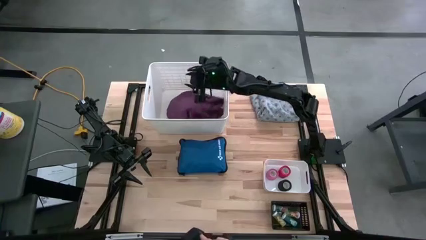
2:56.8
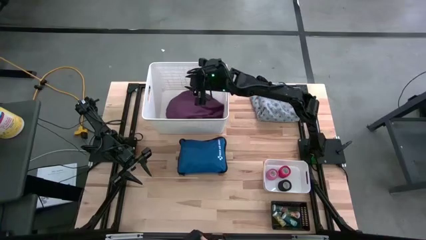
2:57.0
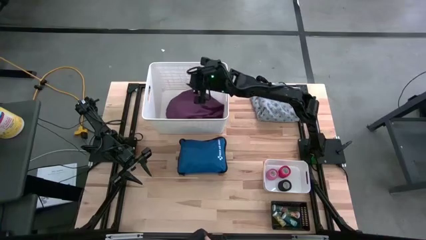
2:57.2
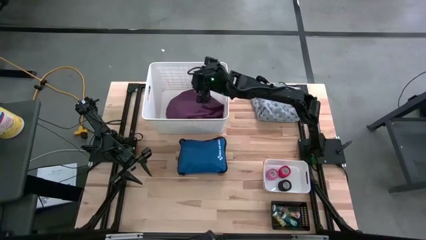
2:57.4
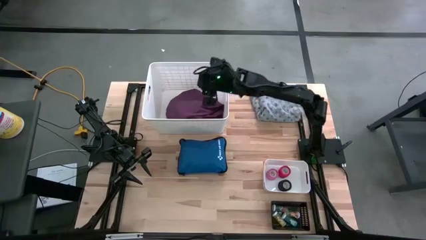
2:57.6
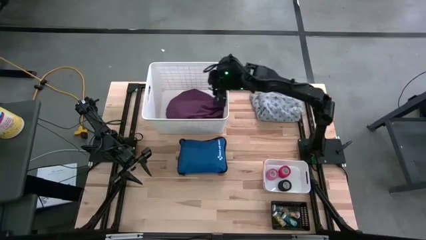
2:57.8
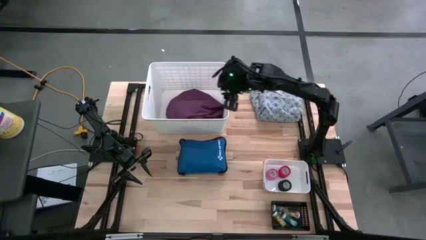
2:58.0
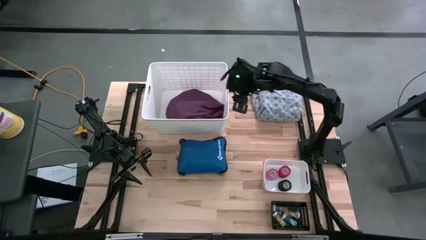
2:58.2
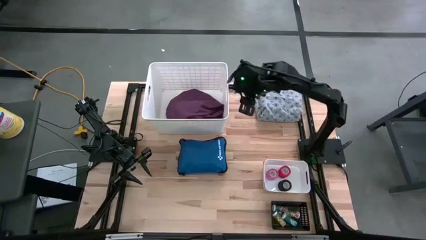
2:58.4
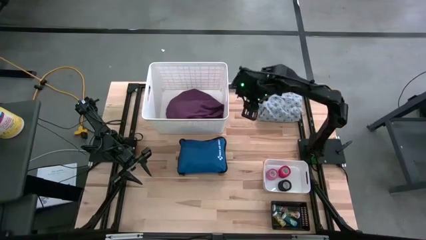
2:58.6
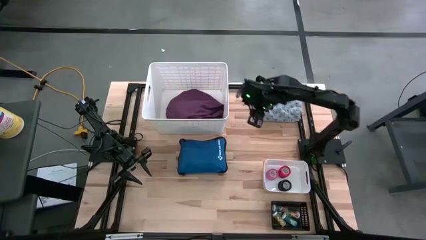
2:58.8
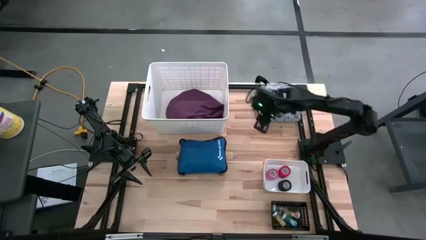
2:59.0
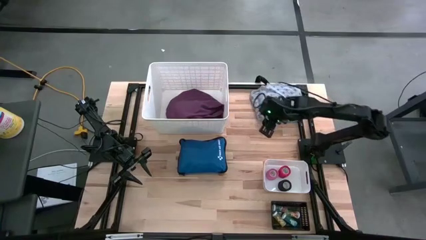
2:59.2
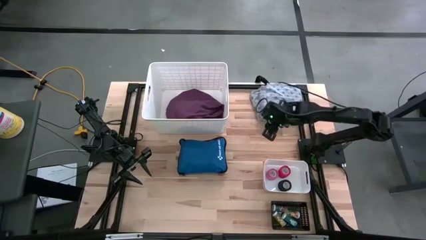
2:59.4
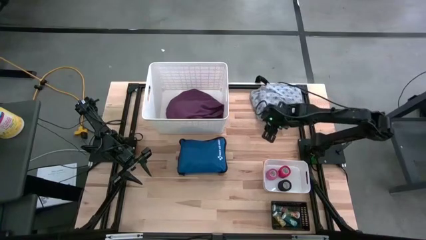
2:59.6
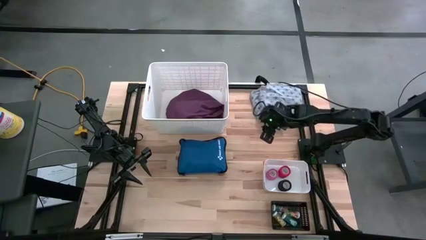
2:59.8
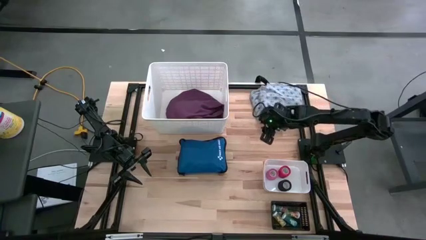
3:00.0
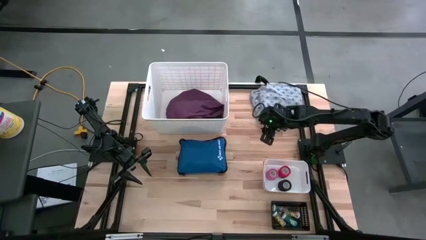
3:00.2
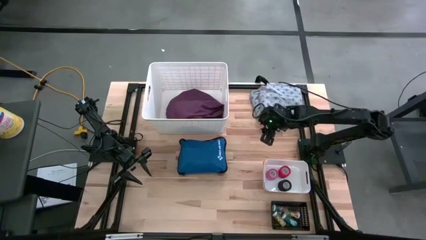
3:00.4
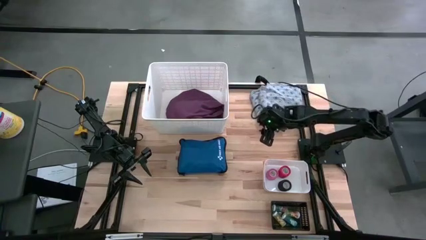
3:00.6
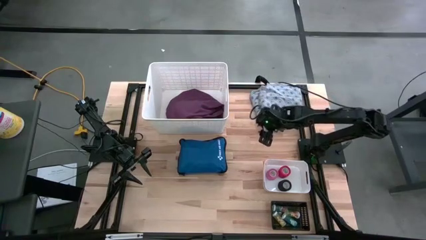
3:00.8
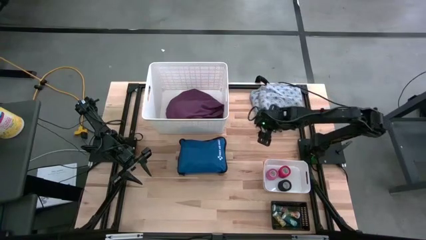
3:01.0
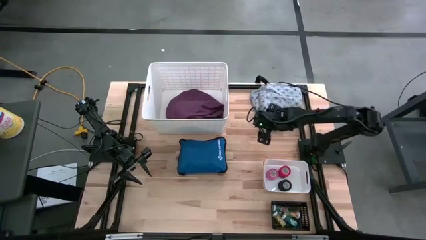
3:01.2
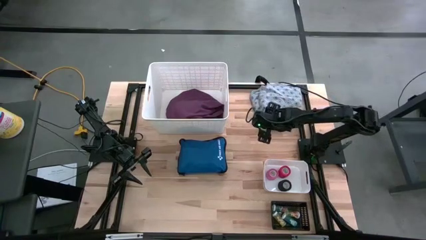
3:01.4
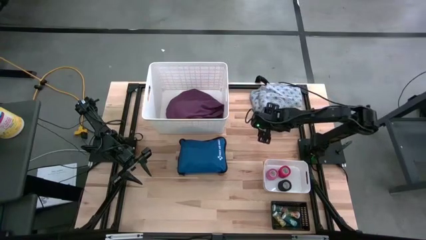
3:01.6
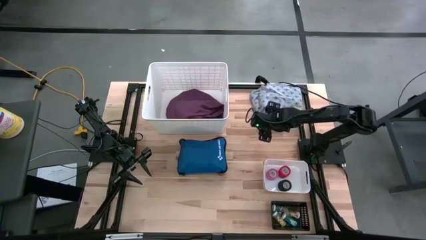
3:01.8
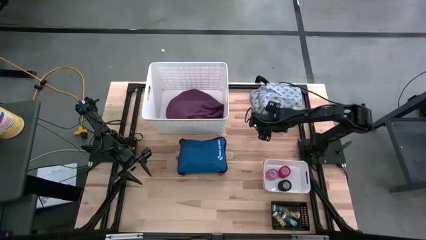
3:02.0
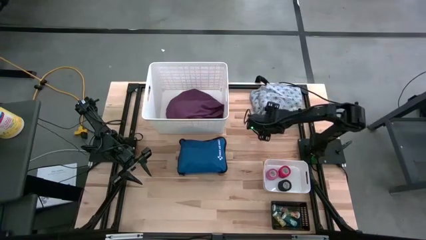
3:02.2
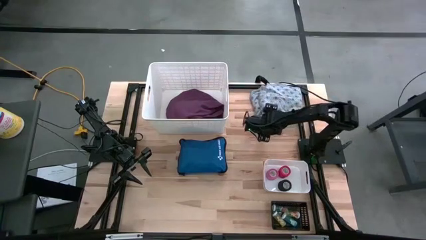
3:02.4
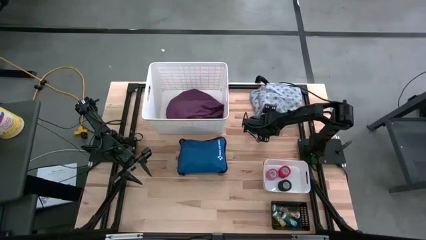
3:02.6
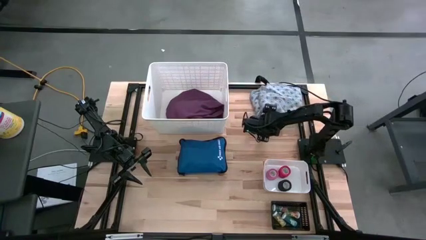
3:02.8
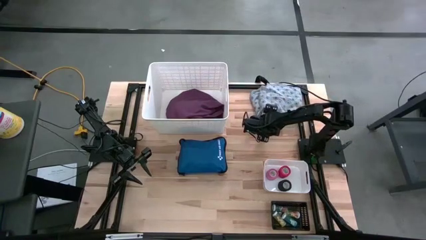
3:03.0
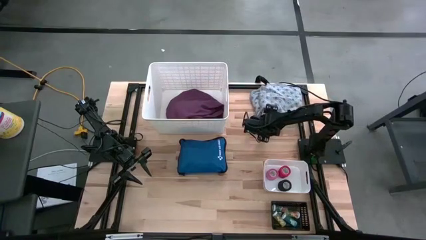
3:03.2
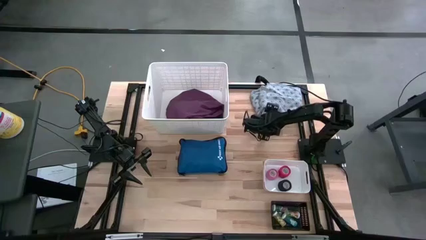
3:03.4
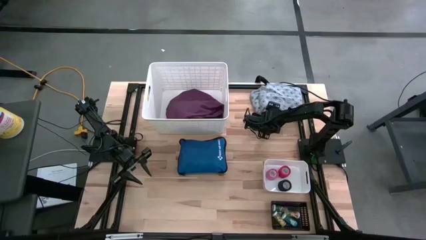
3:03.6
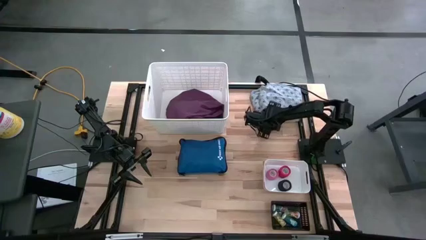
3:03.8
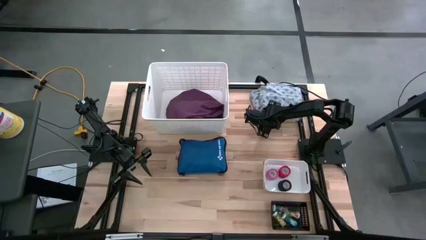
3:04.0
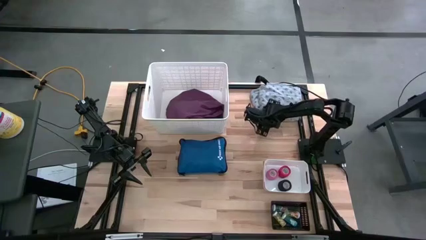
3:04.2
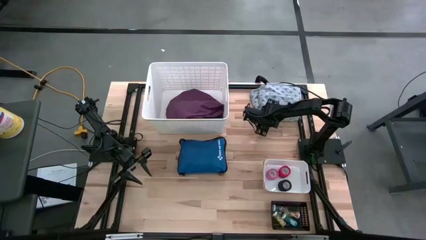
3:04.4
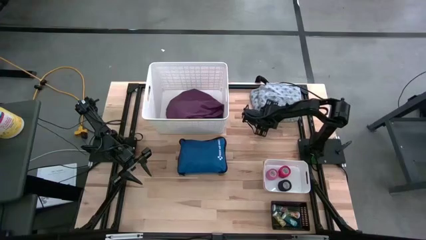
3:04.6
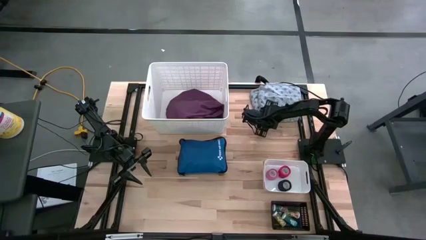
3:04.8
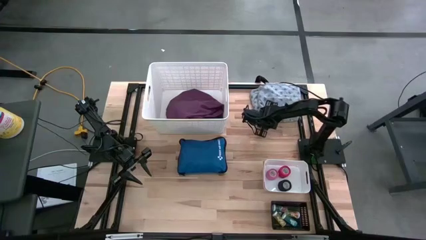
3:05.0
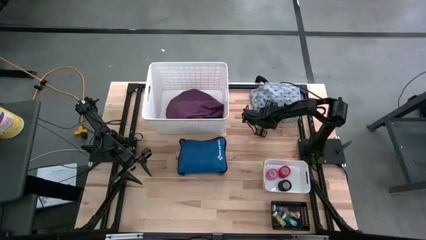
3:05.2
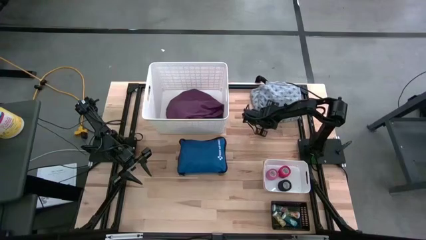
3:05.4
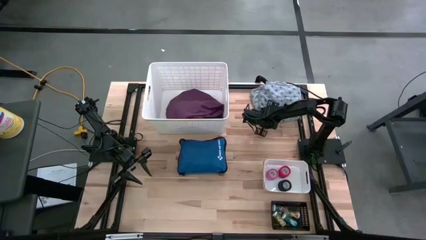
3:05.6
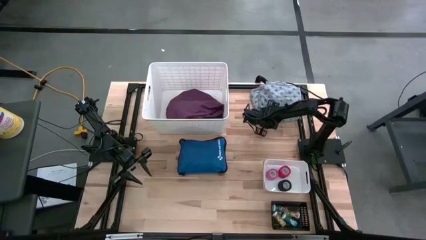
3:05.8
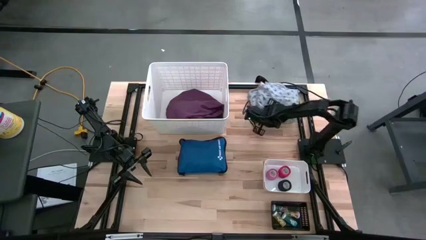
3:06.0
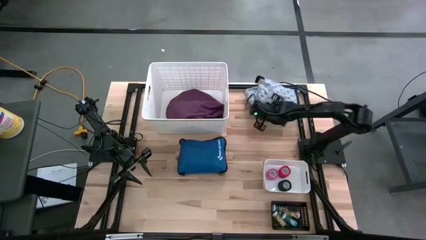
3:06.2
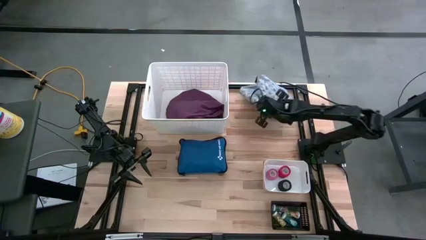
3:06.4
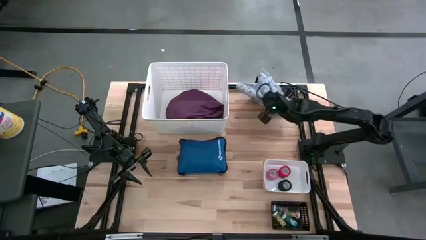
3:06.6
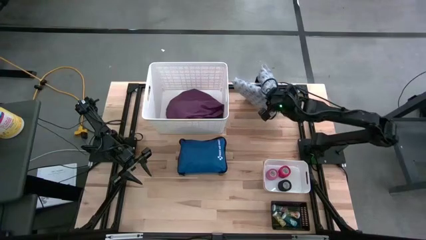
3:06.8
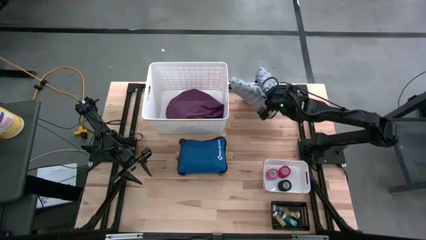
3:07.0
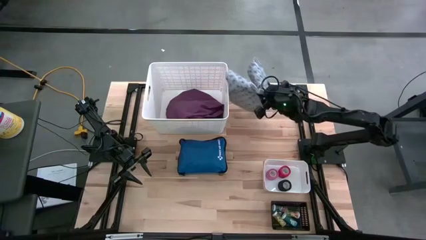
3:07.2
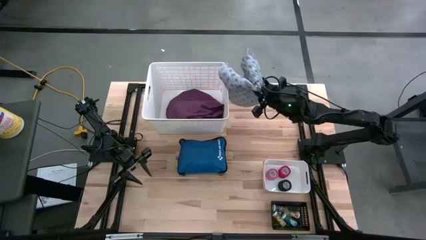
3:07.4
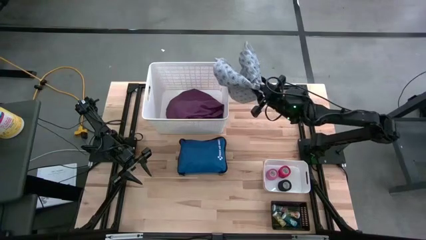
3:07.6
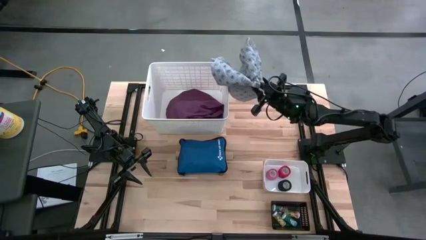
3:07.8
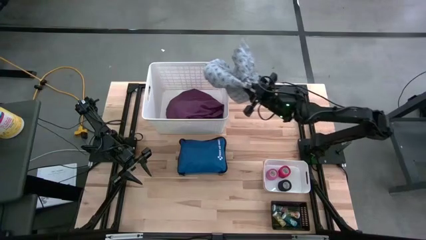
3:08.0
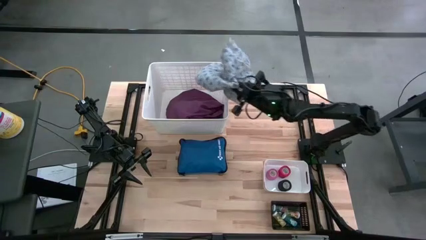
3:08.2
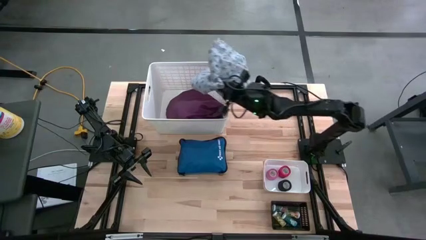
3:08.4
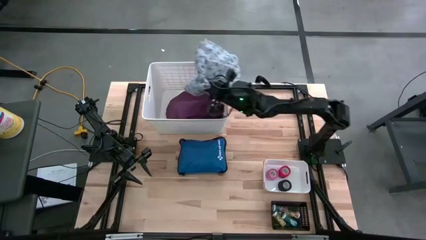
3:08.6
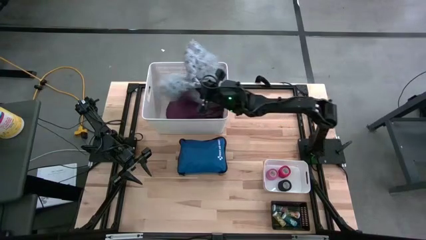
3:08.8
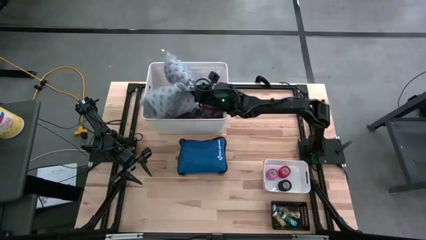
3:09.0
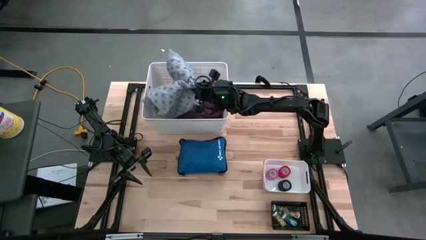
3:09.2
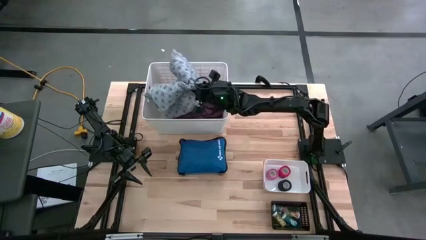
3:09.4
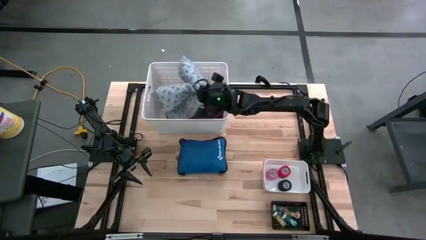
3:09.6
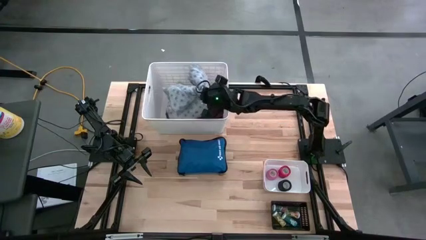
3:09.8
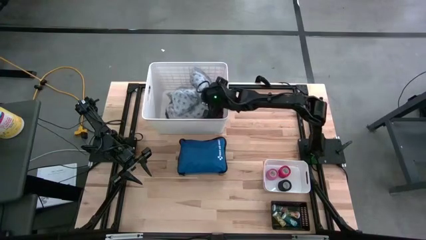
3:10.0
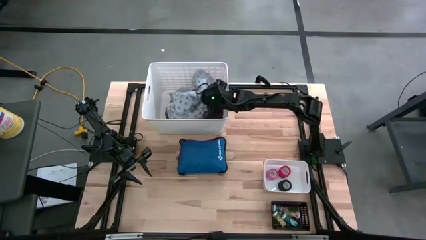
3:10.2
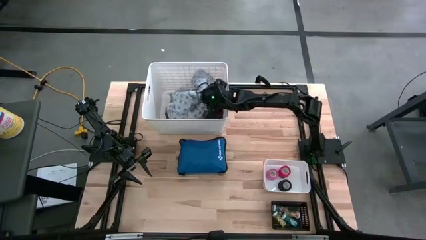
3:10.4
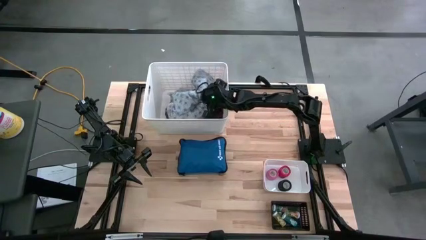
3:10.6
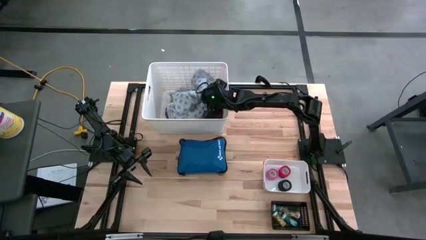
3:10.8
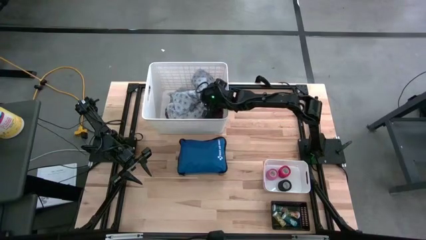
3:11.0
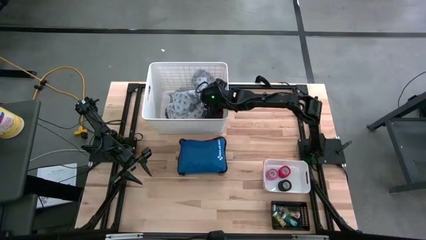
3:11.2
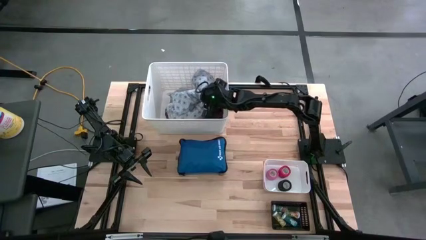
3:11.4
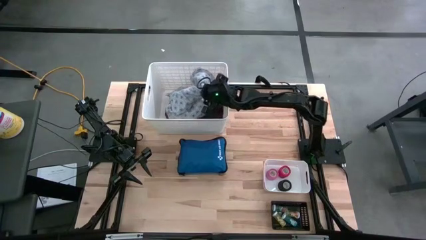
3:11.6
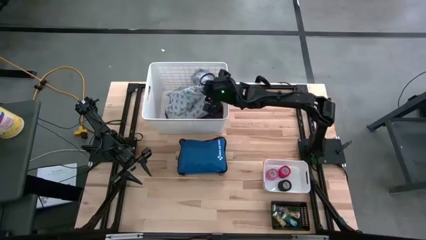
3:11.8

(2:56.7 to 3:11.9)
Task: Pick & Place Medicine items
Put the blue patterned patient gown into the white laundry bin

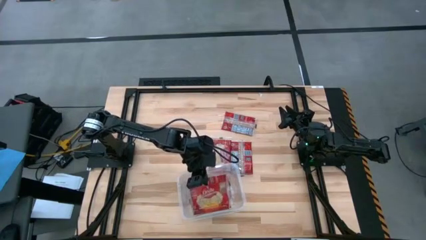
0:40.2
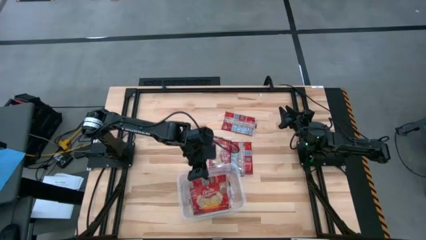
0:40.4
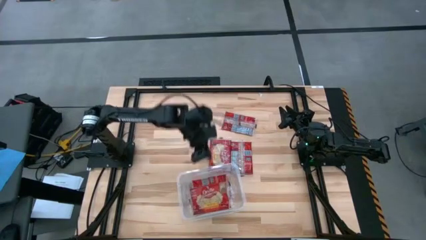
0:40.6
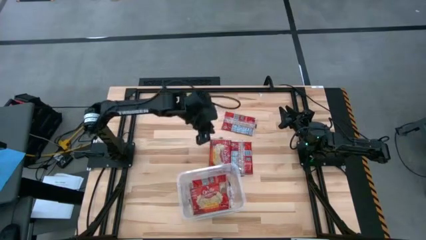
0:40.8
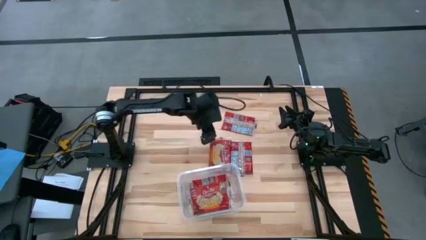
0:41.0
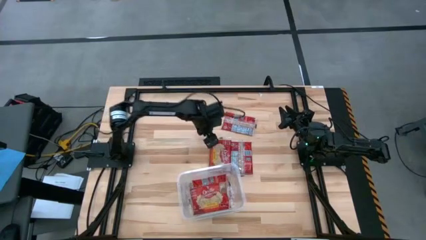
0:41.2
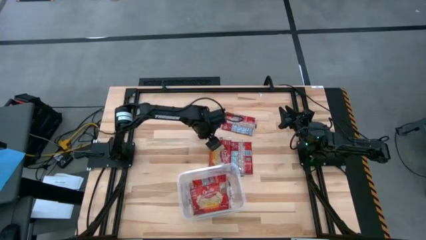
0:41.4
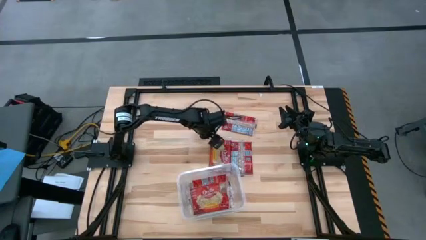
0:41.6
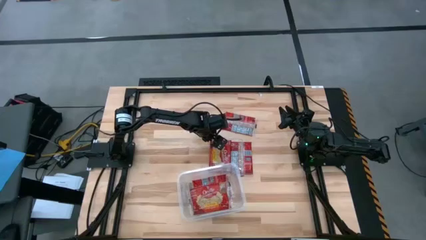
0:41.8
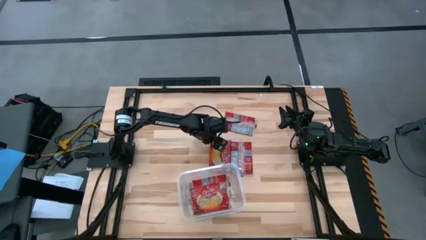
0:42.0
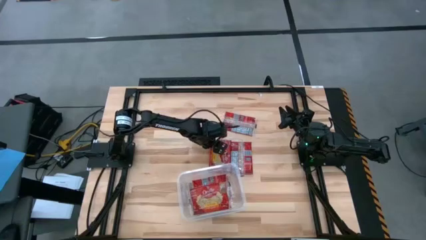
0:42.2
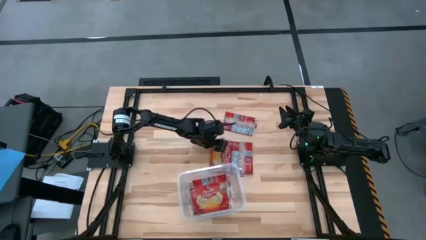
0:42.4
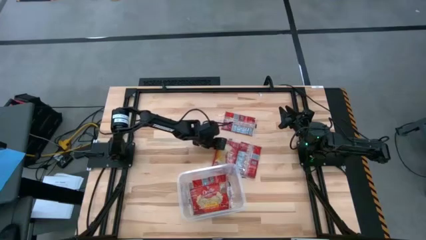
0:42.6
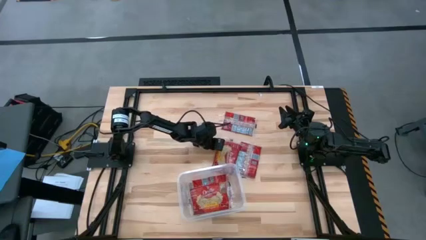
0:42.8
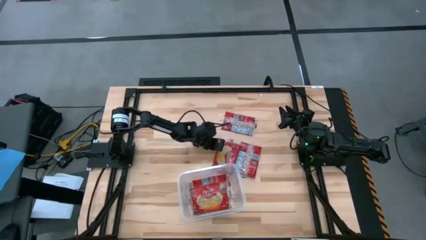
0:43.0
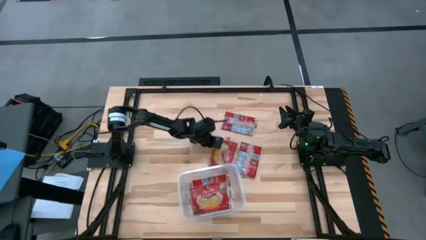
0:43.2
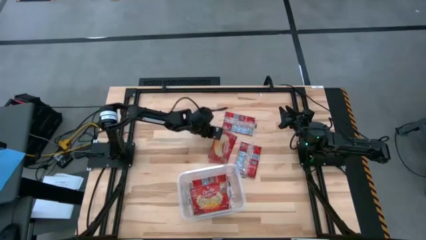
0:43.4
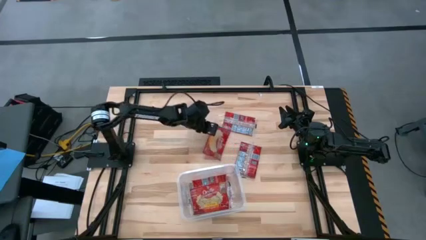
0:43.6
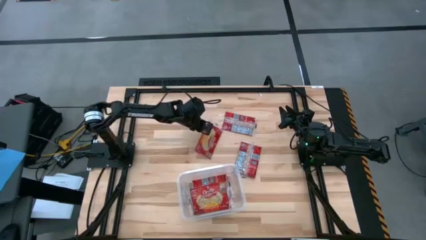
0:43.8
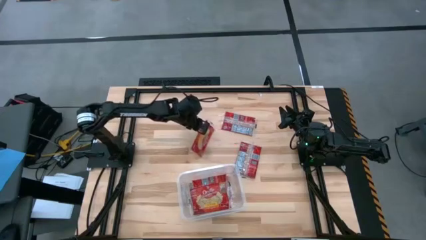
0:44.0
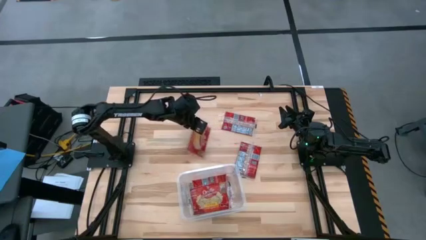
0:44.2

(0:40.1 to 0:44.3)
Task: Sort popcorn bags into baskets
Put the red popcorn bag into the transparent container
